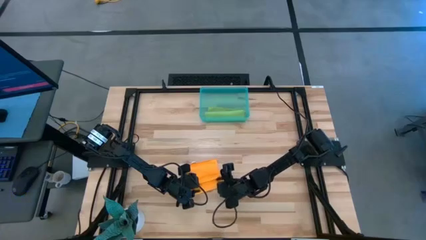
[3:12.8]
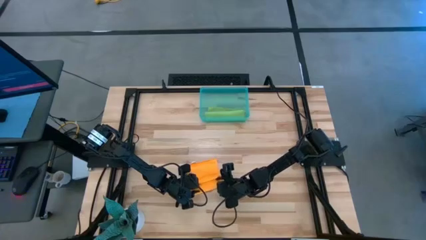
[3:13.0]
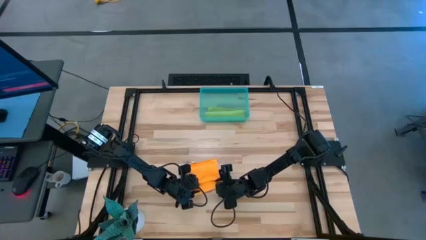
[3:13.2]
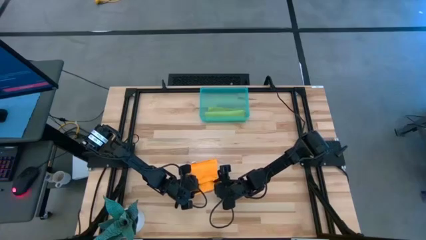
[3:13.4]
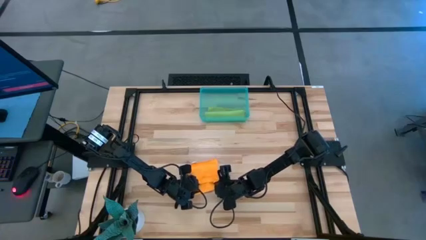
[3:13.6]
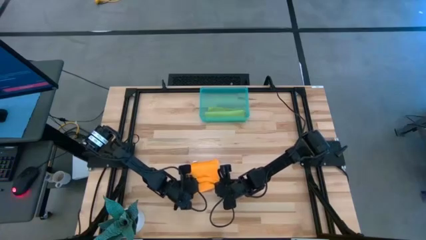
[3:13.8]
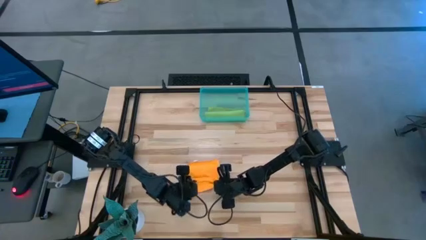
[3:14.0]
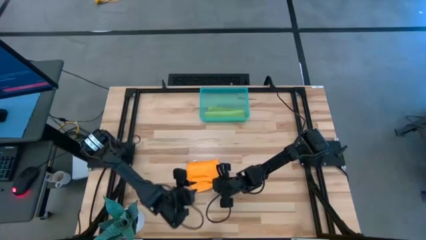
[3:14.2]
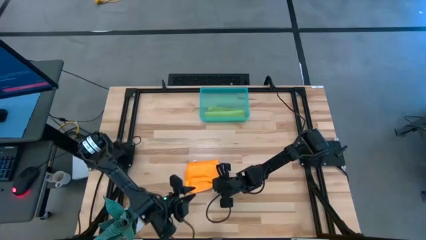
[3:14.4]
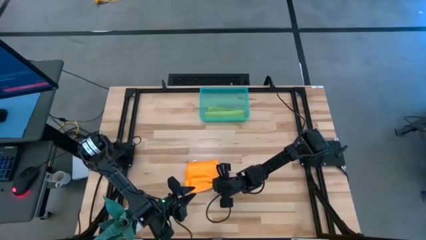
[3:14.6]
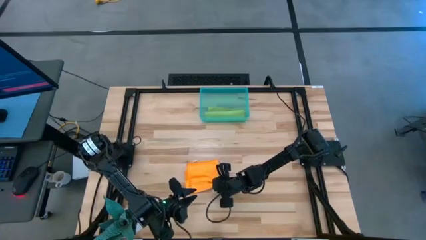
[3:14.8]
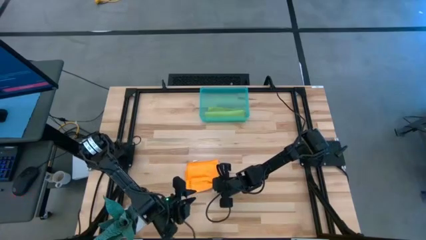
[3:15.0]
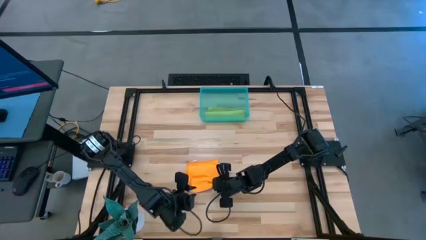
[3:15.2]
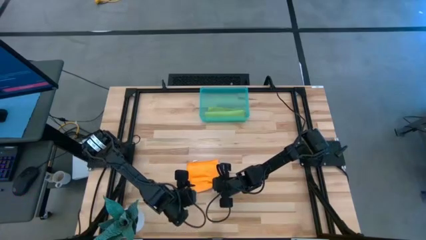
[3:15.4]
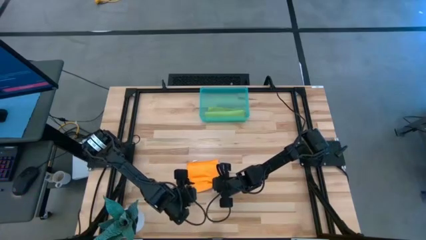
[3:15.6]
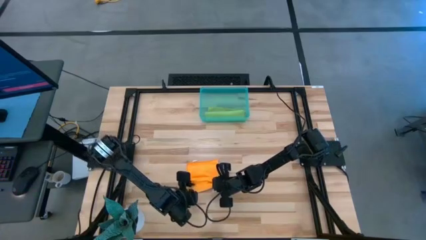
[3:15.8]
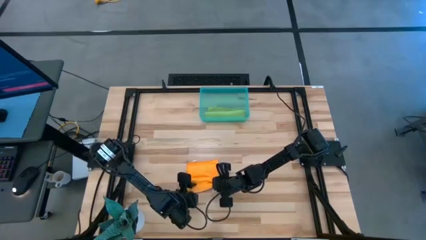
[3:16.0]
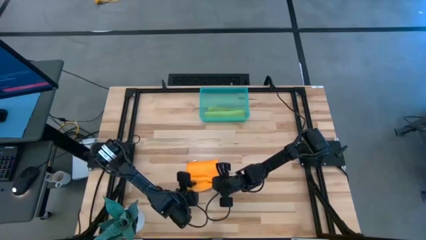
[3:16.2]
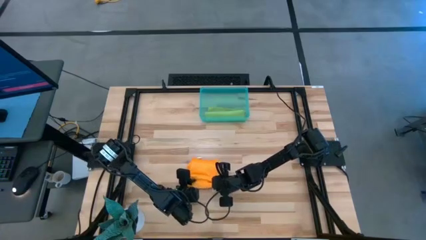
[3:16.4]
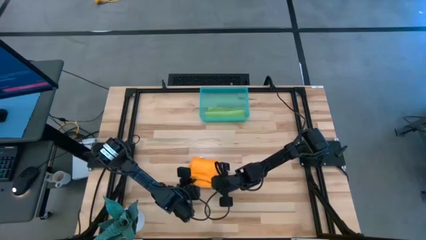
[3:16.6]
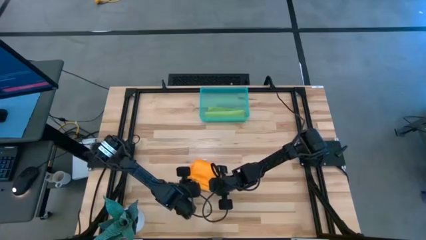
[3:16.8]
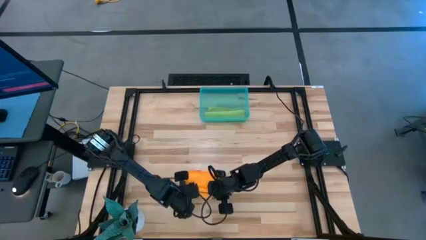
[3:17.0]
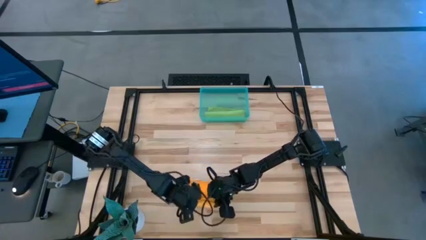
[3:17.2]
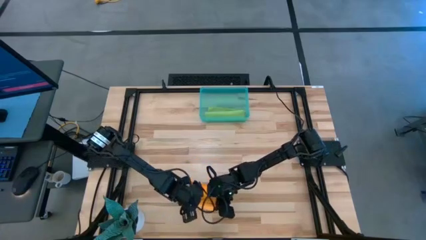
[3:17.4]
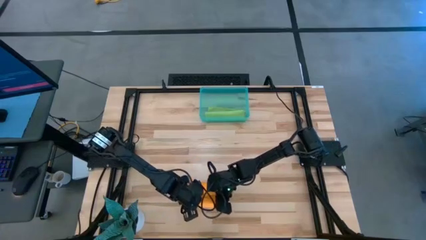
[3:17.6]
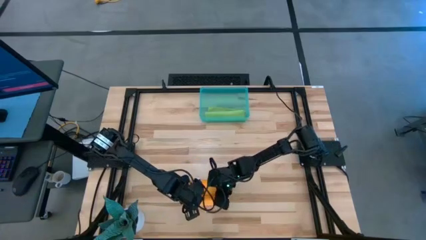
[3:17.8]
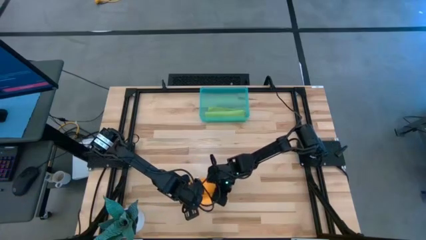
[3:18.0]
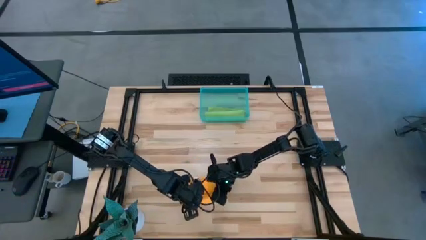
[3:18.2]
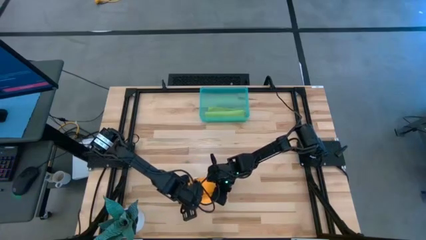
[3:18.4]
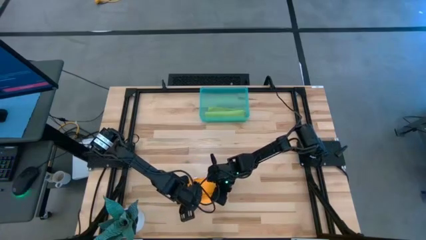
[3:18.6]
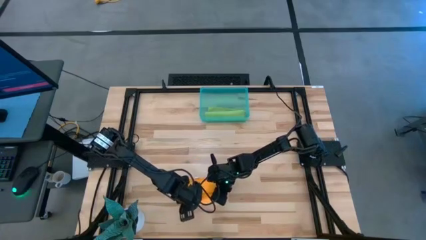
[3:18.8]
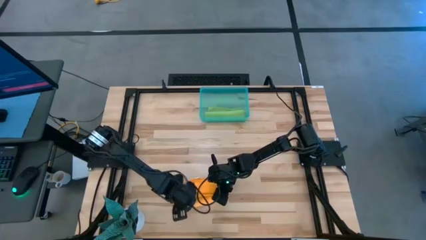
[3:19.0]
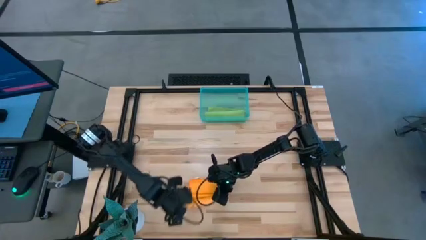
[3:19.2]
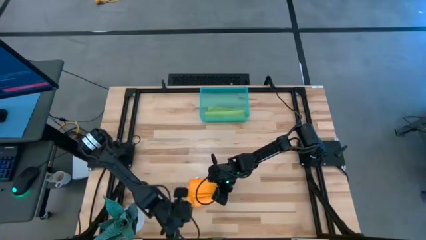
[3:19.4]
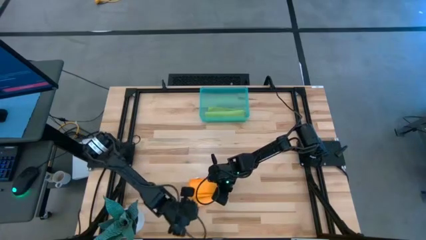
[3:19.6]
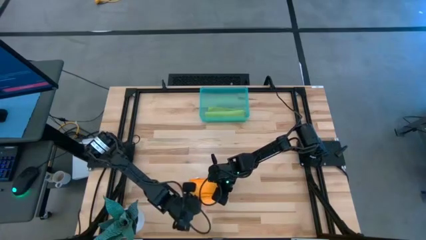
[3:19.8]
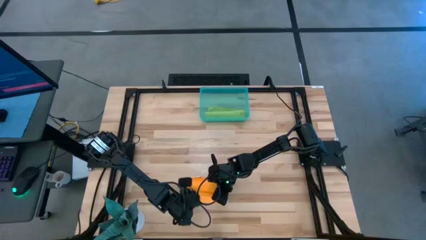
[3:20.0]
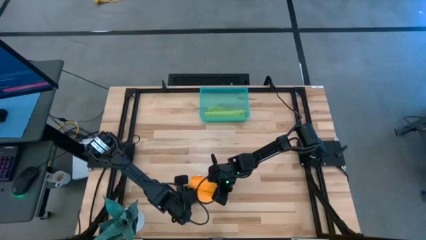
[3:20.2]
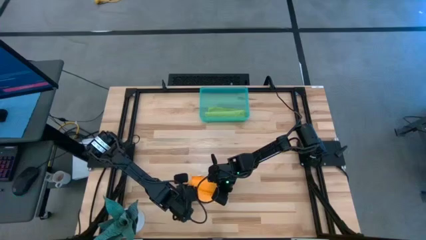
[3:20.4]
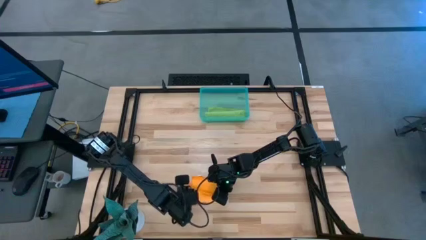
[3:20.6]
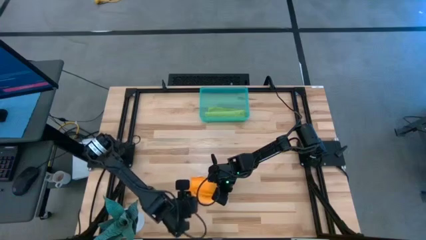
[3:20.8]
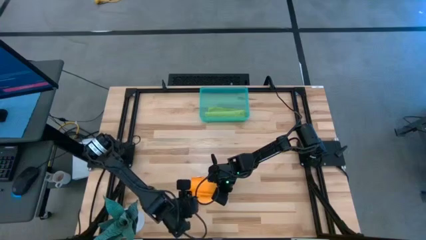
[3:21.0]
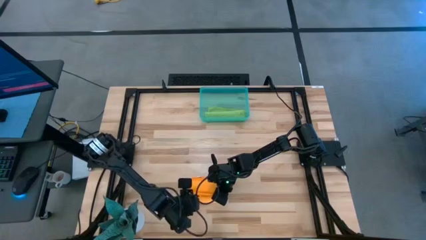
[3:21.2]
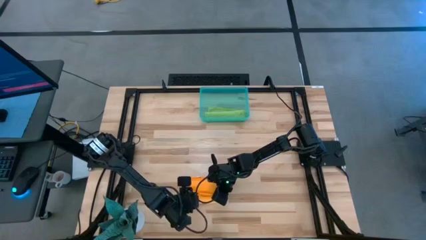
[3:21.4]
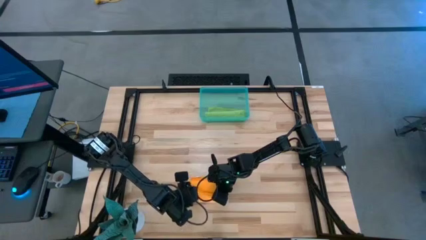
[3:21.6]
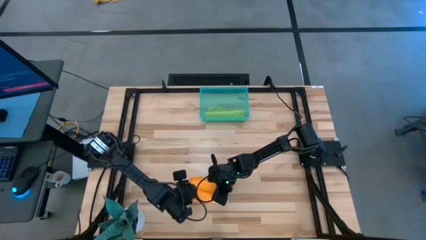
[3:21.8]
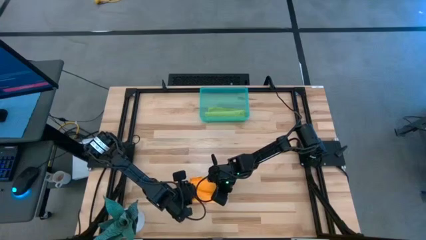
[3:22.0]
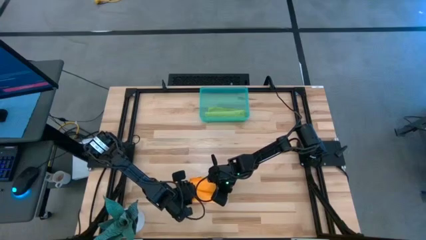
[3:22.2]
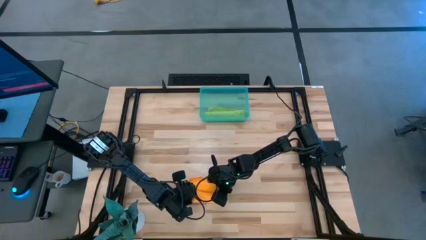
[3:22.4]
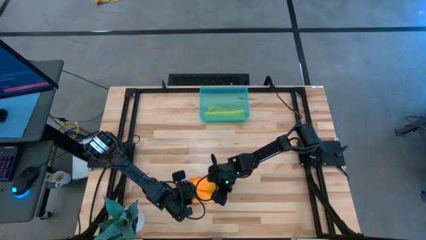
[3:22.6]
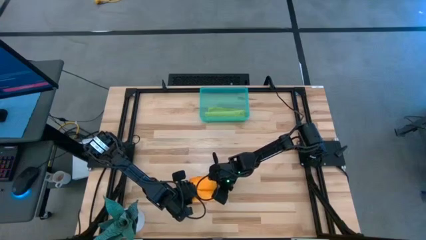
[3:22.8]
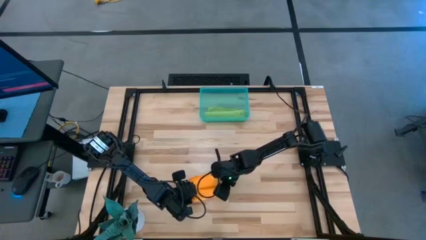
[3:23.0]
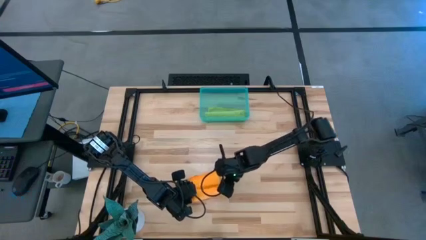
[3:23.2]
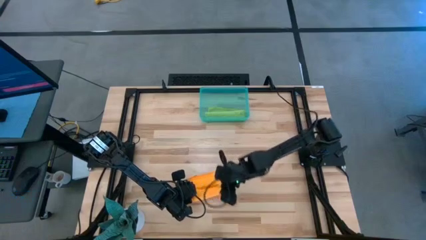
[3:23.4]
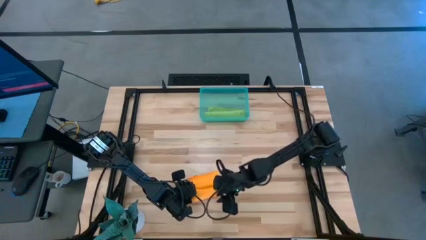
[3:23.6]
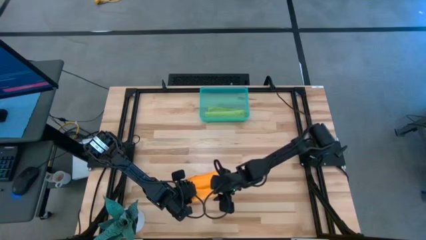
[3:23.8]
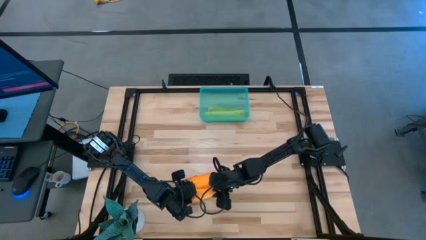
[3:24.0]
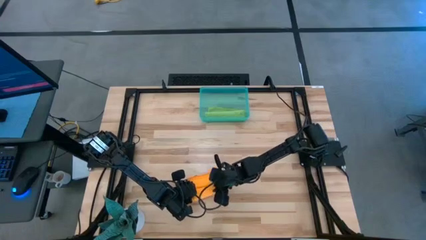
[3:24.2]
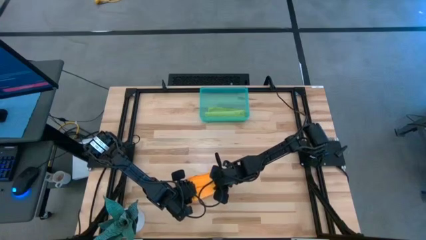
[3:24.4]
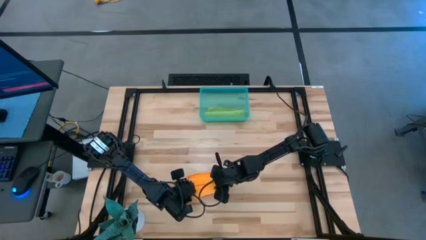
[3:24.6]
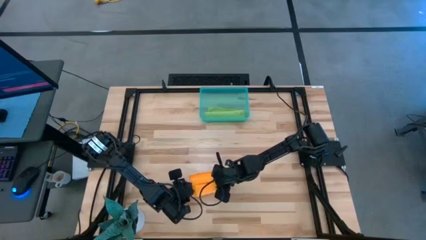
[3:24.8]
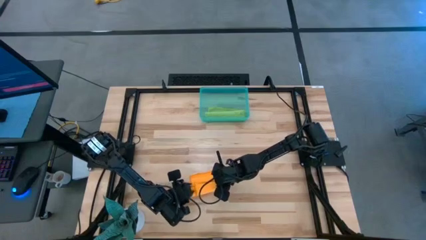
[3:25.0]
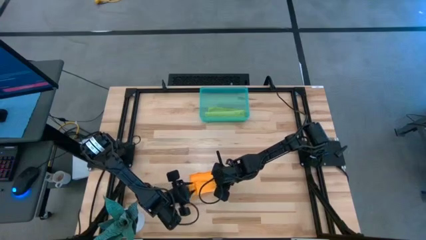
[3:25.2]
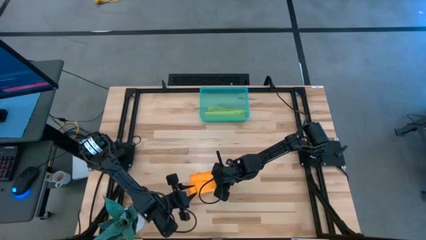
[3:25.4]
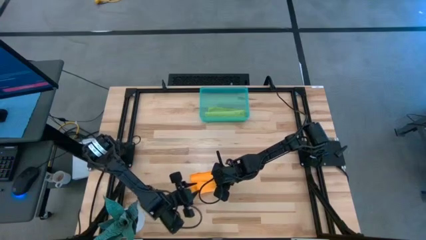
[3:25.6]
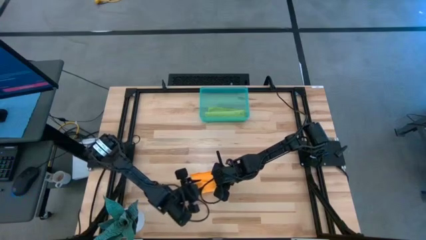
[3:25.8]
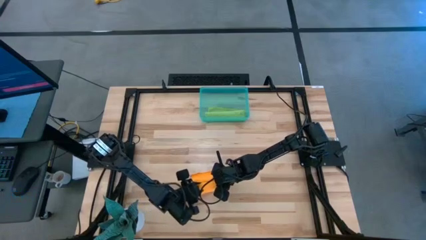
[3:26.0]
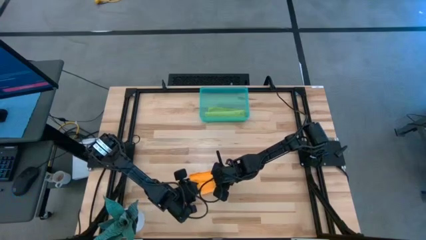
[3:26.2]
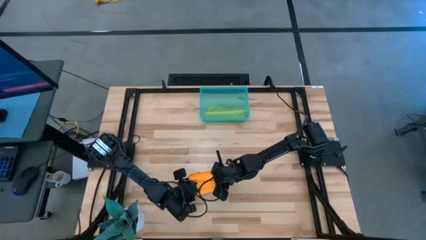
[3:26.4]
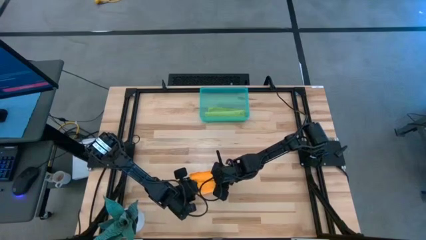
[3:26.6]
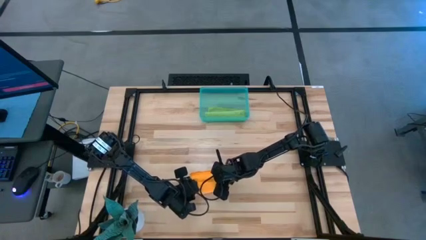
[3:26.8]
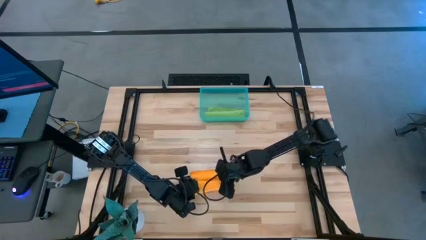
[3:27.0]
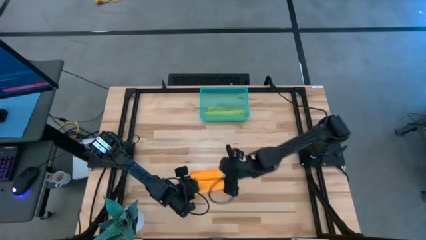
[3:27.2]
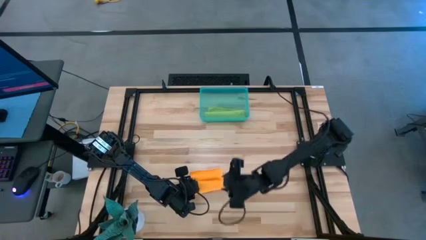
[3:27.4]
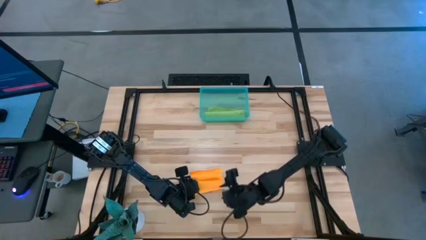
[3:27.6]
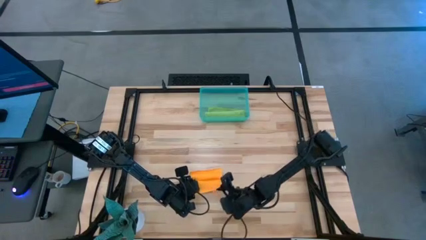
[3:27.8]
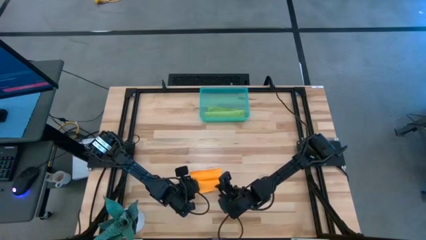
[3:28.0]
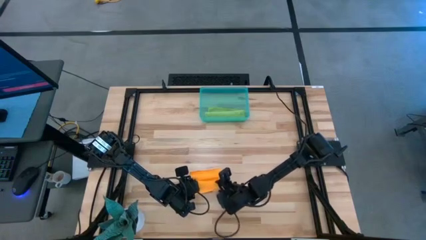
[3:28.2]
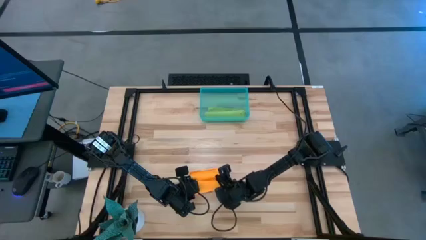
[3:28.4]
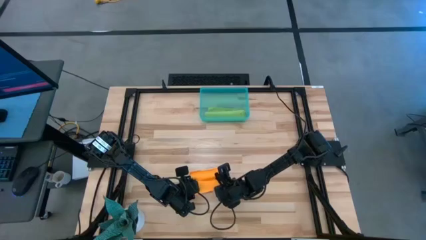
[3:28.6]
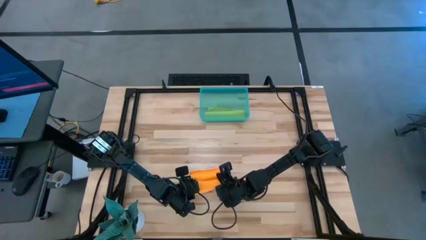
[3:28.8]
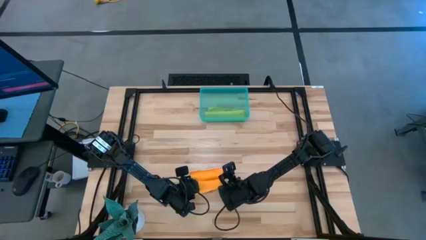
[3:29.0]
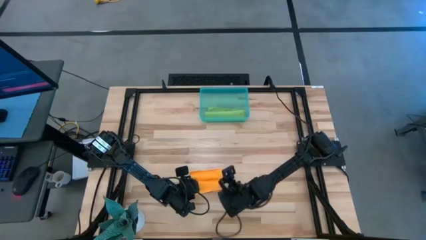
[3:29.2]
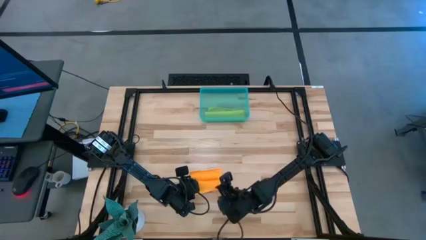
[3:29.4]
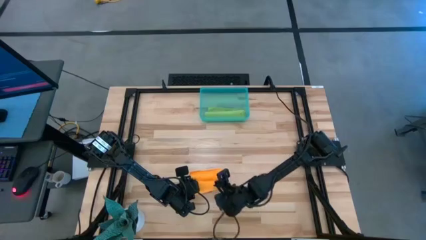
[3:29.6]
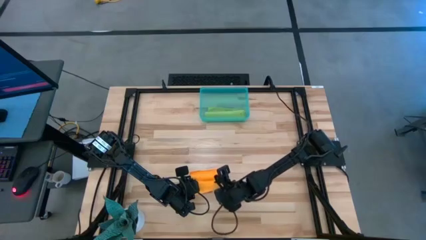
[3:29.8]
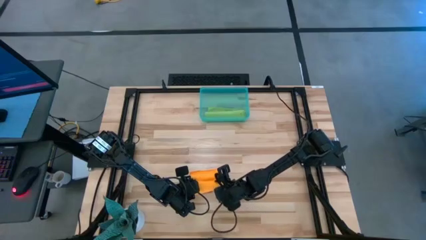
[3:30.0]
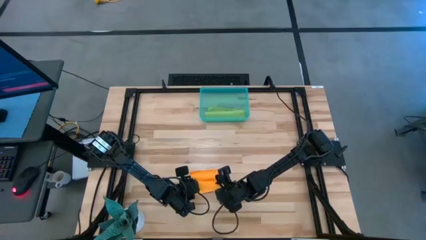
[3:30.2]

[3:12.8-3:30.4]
Task: Roll microfiber towels into tight, uniform cylinder then place into a basket
Roll the yellow microfiber towel
